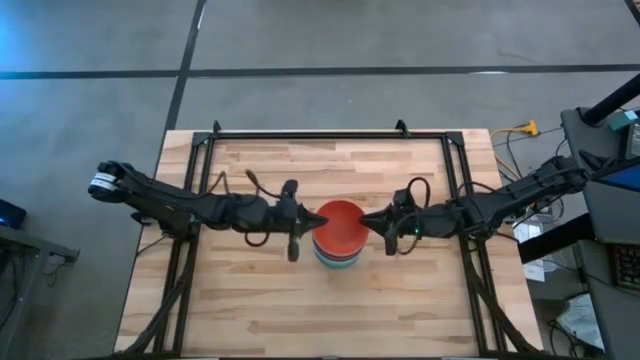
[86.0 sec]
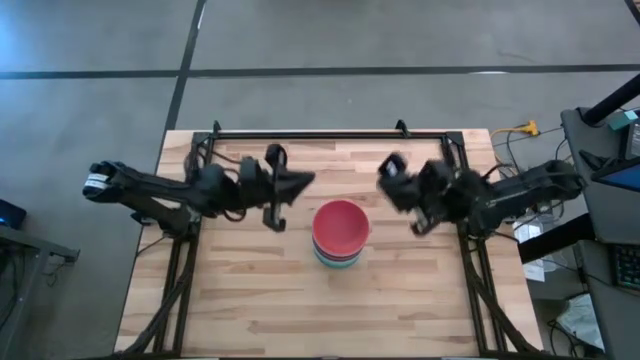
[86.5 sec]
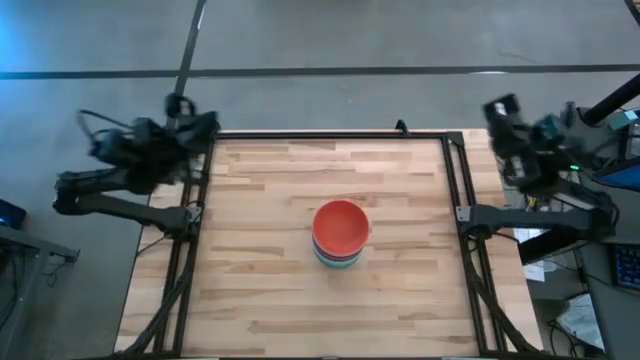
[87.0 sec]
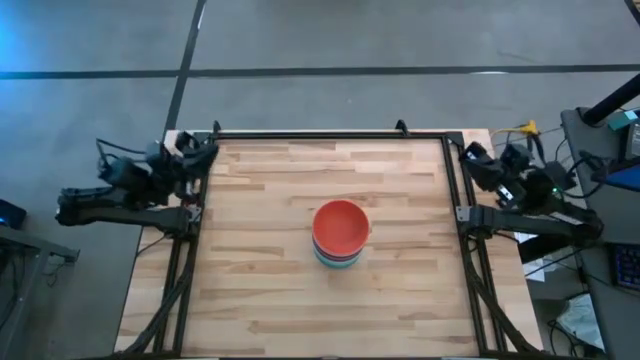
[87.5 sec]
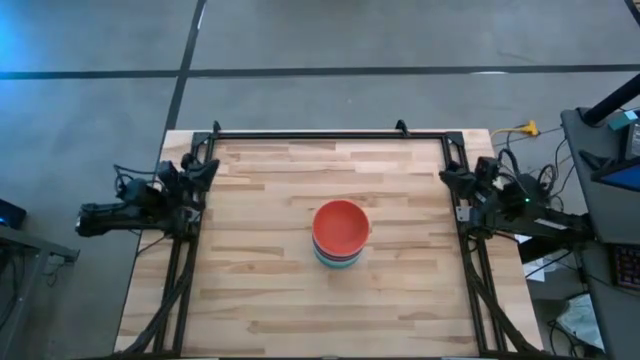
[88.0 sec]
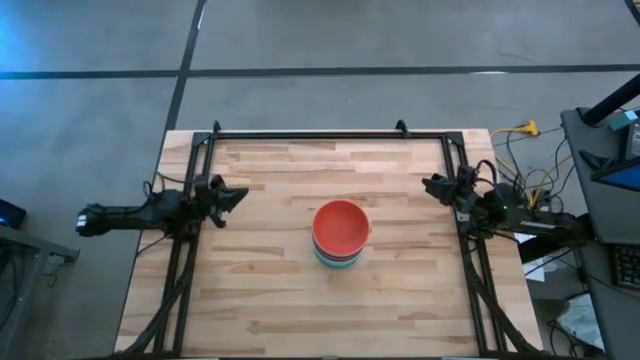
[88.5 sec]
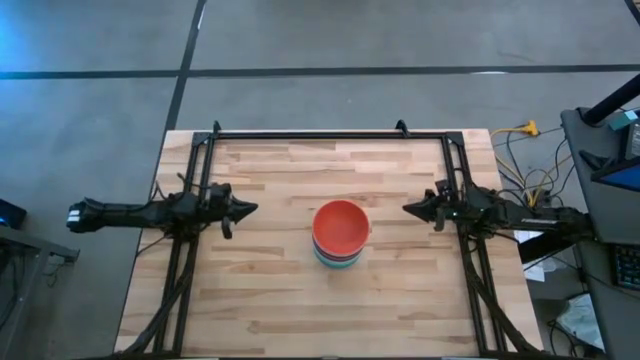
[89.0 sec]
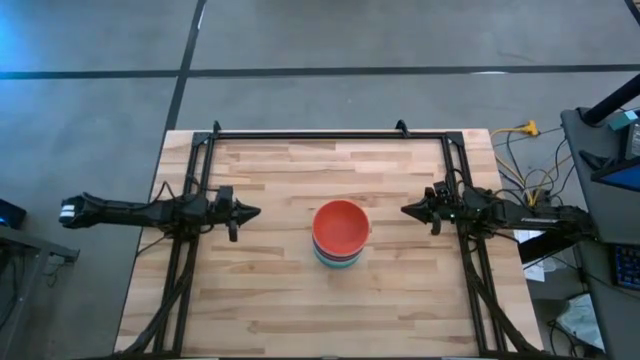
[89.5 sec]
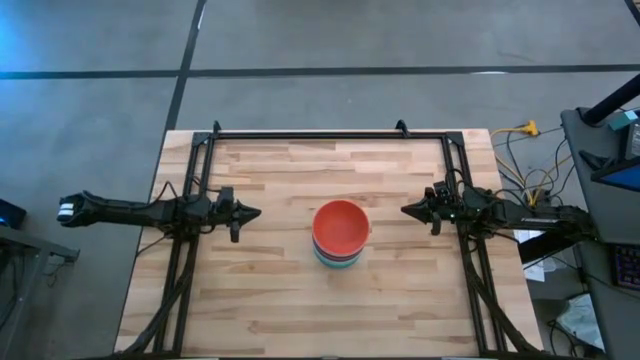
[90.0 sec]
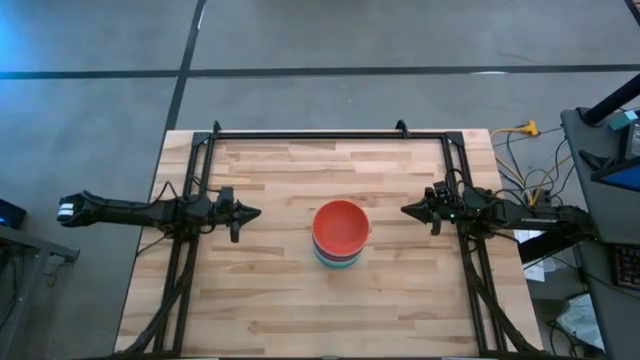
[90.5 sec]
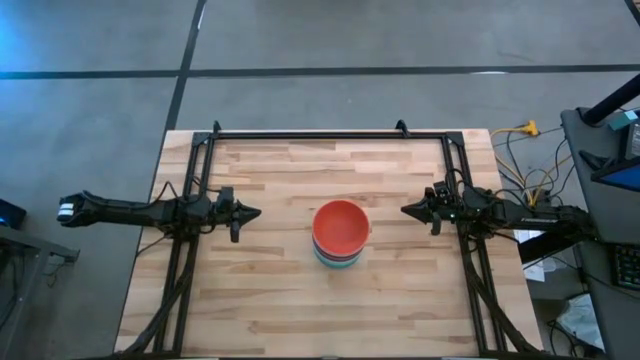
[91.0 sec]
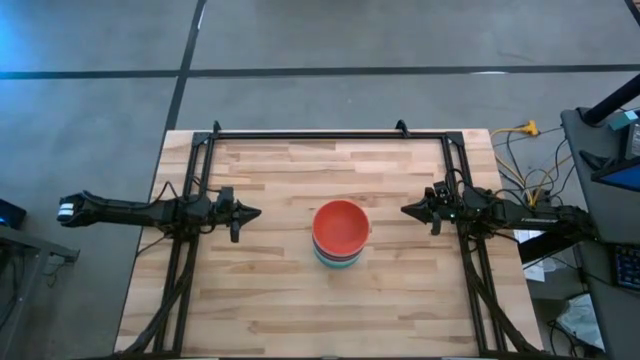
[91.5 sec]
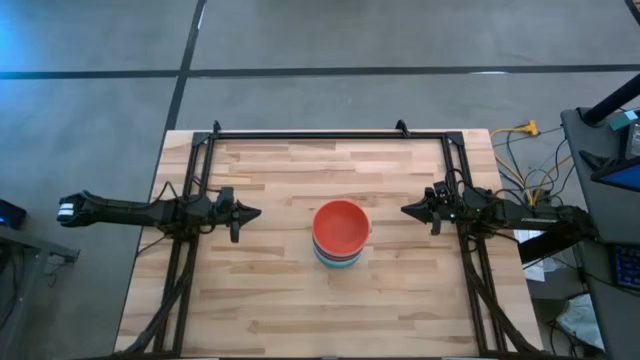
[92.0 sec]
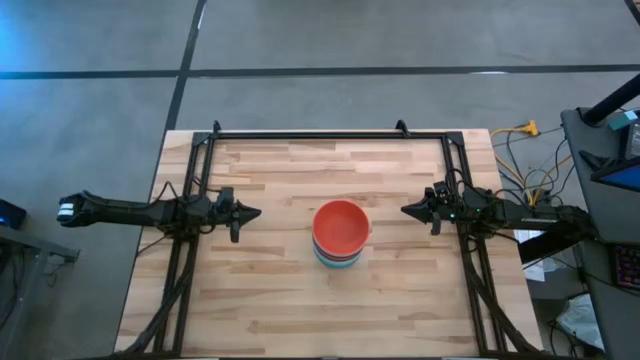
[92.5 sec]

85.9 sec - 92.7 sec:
Task: Nest bowls inside each other
Return to Home Position

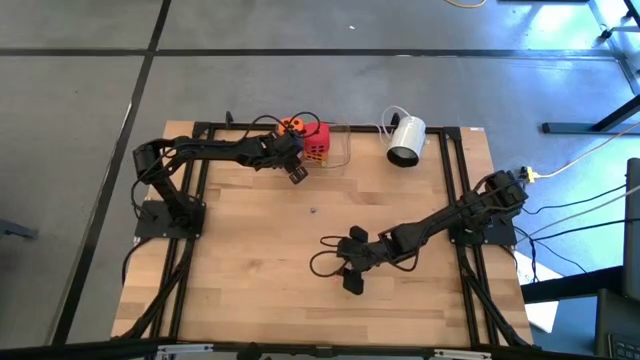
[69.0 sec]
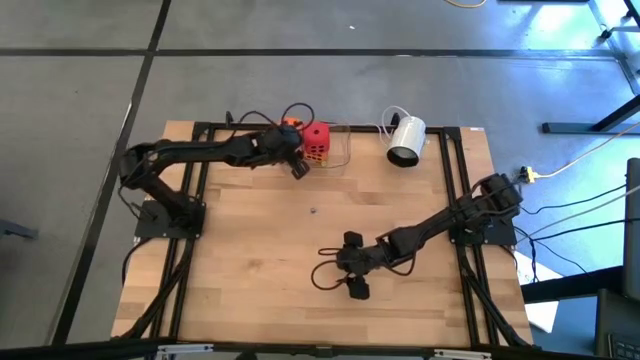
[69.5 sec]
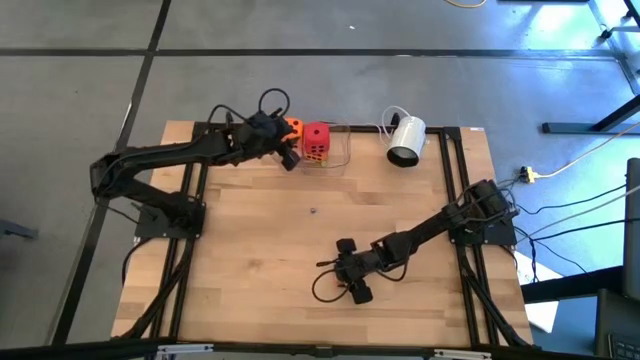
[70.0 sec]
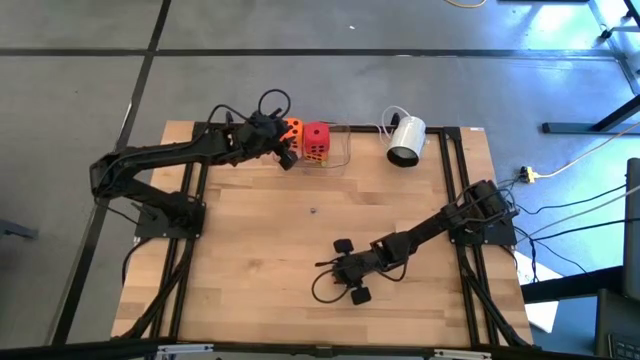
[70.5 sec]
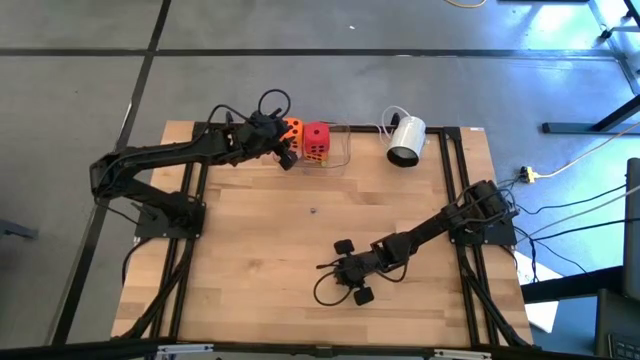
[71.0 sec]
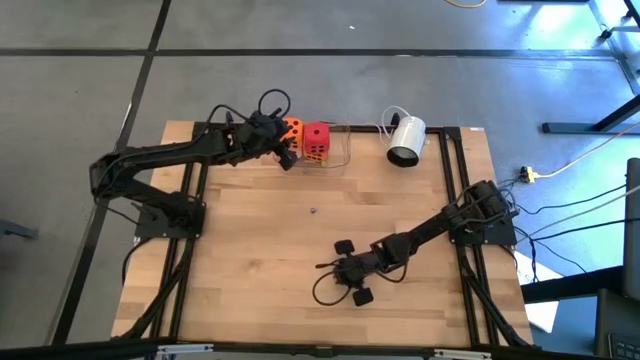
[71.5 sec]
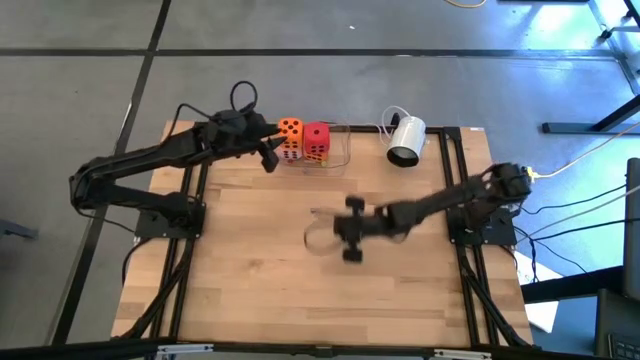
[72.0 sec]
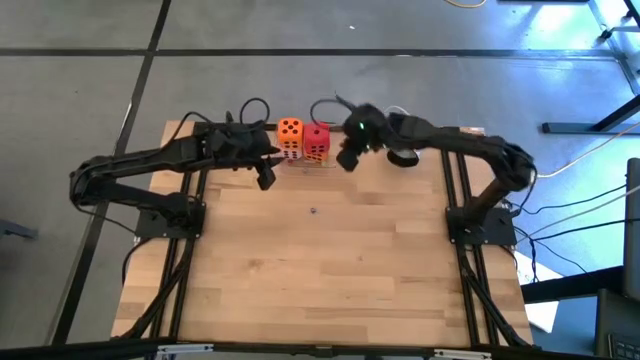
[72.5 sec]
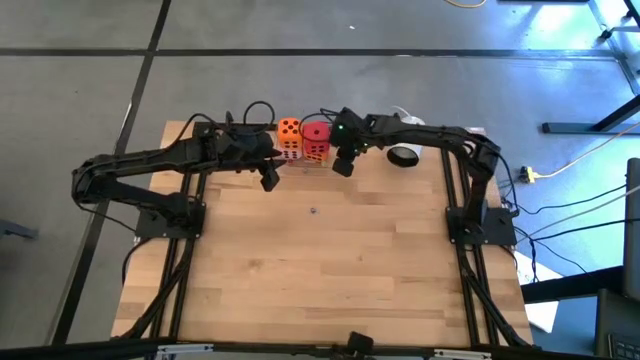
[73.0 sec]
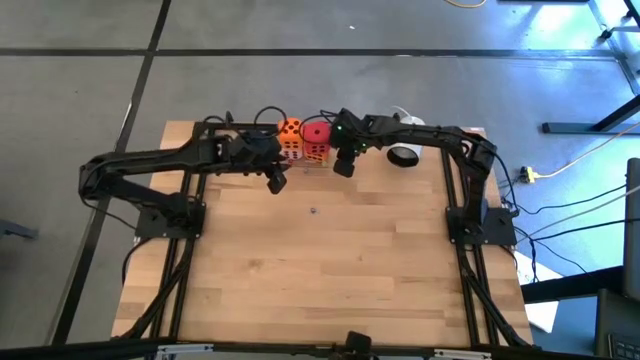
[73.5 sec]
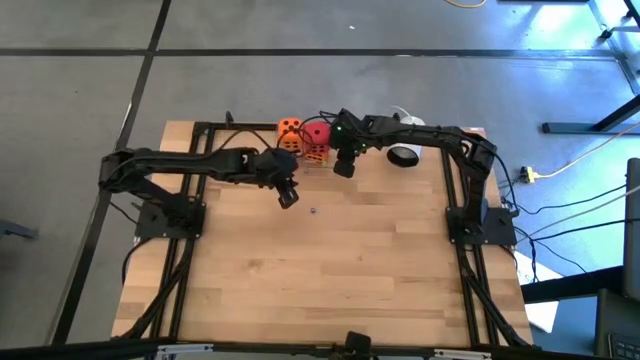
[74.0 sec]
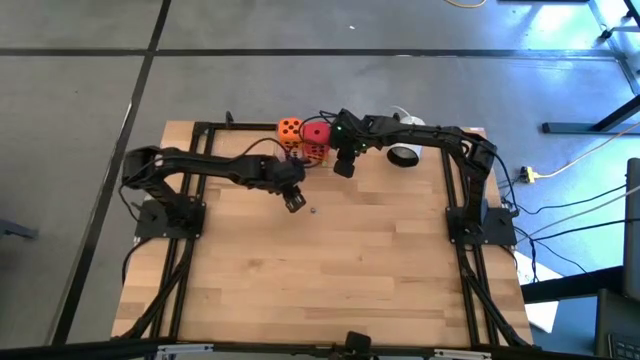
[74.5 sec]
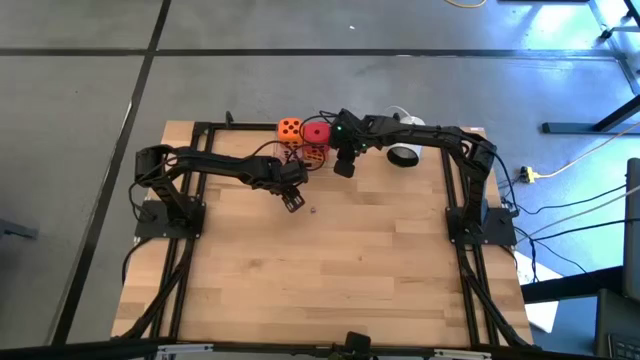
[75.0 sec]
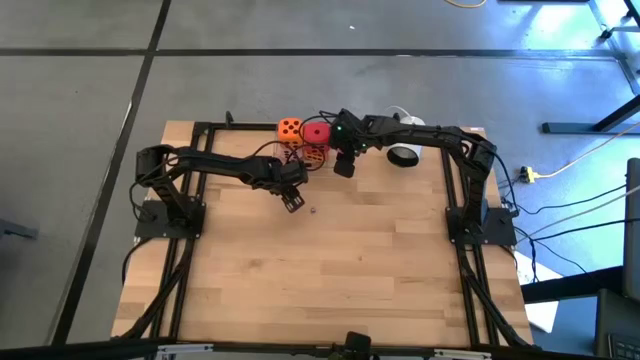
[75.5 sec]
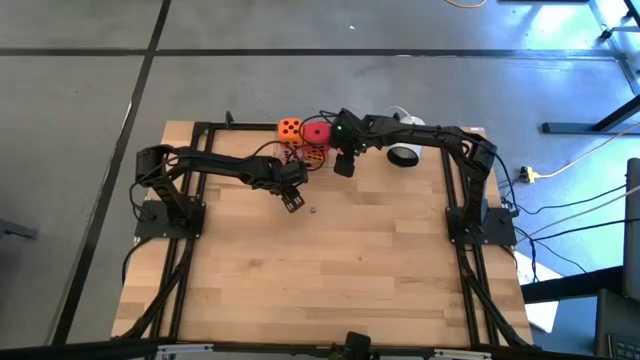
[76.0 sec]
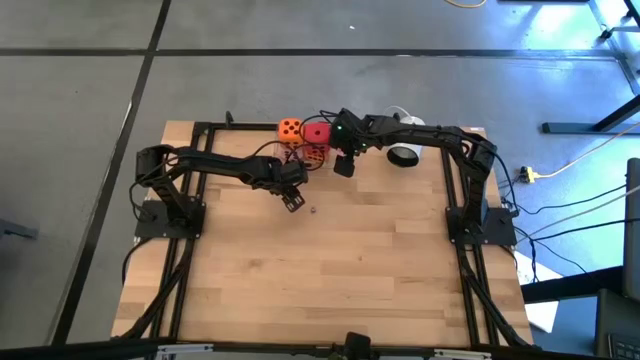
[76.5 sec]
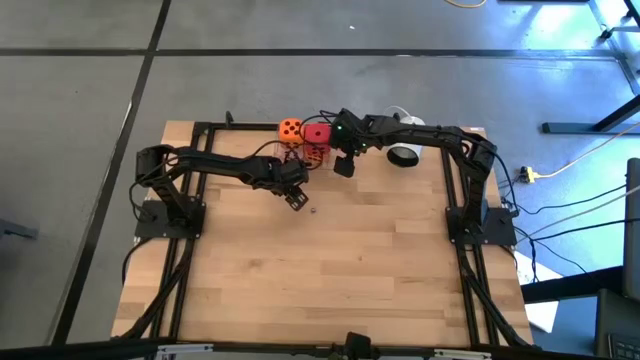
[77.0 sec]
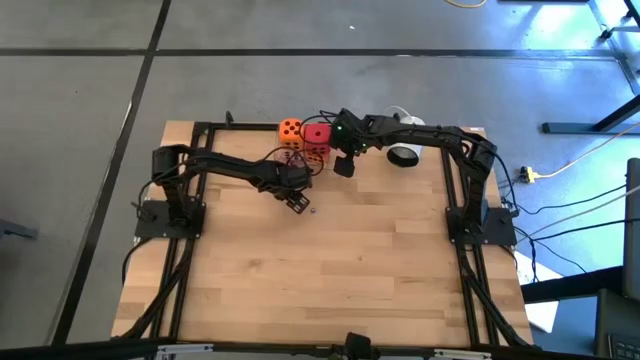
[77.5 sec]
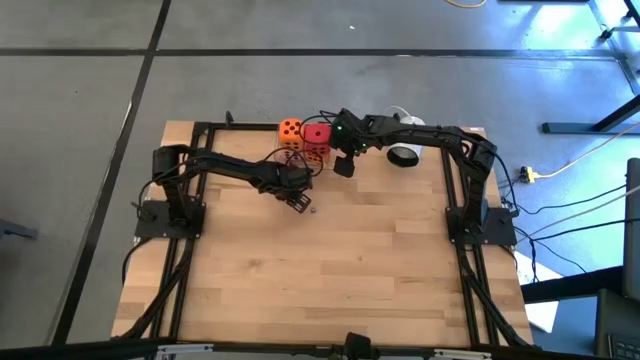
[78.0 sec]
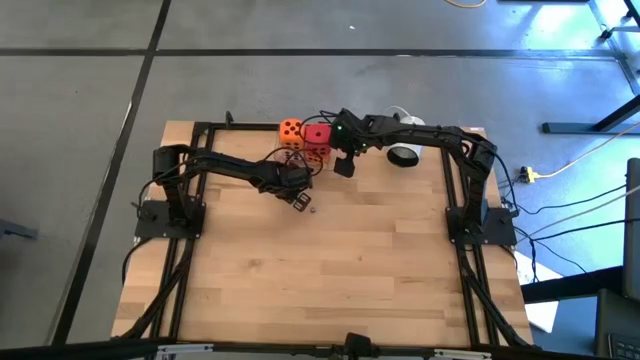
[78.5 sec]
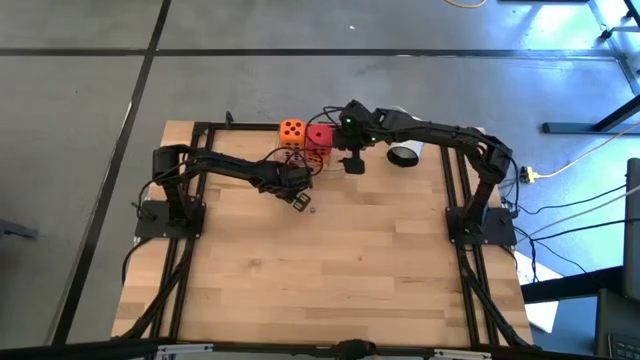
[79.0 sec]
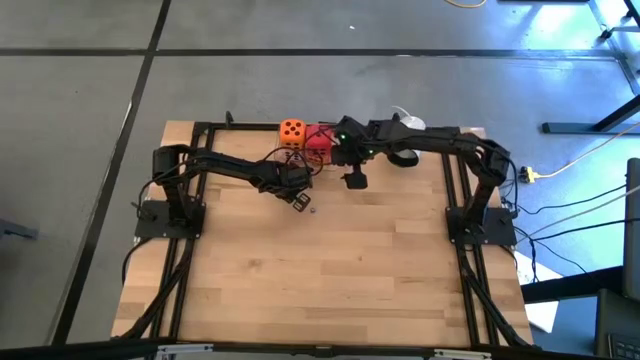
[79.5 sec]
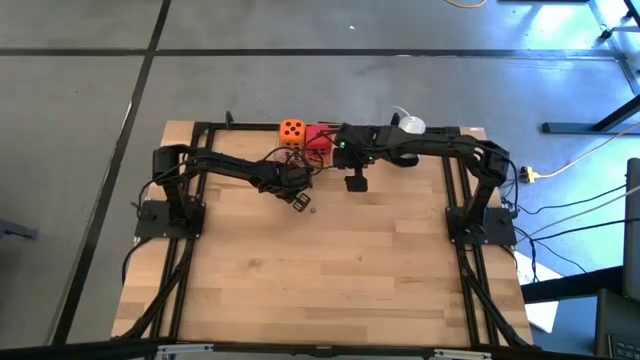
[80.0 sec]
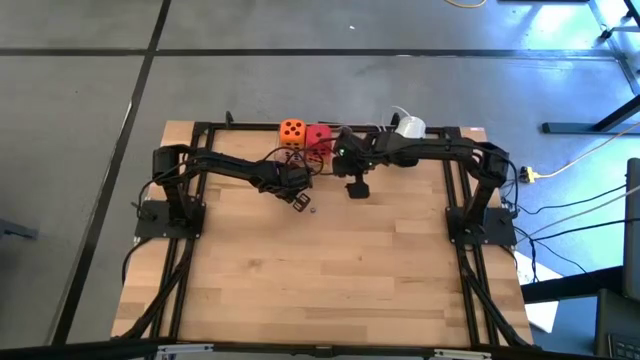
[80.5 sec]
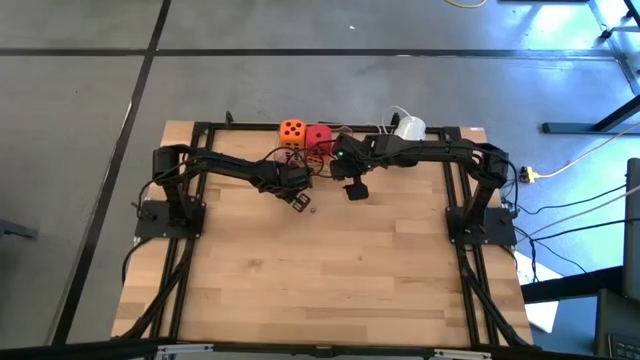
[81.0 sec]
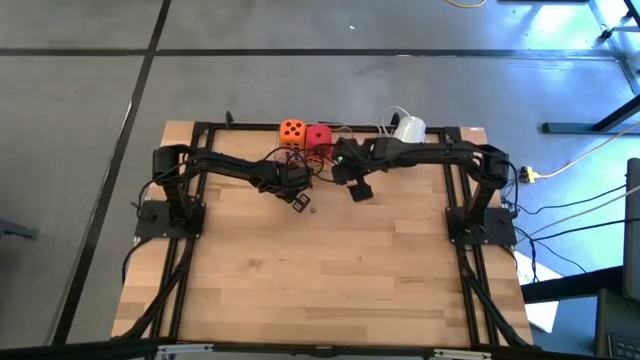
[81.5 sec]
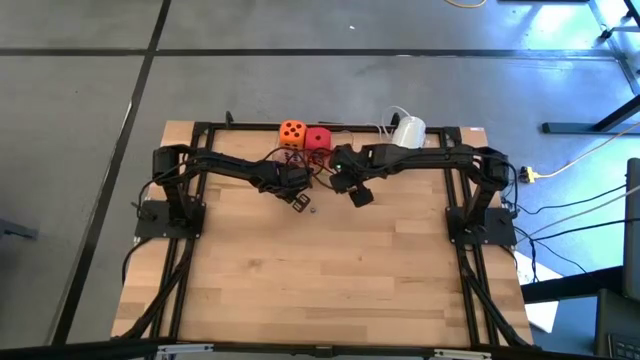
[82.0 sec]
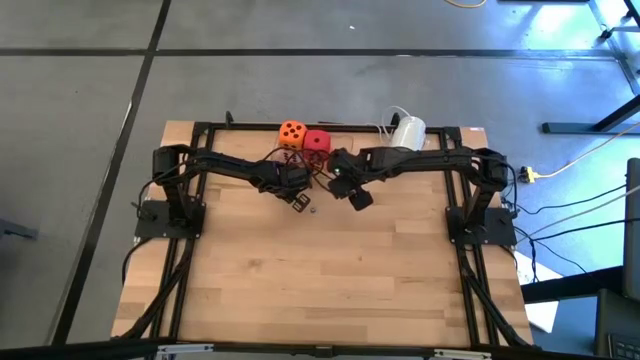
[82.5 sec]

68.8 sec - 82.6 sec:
Task: Pick & Place Dice
Put the small orange dice in the transparent bin

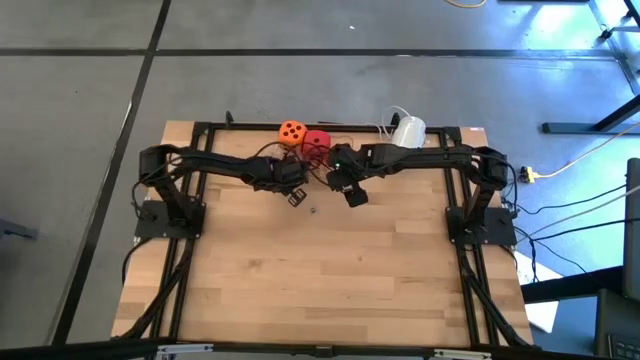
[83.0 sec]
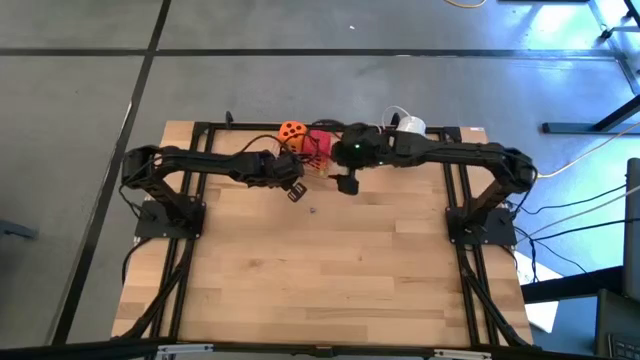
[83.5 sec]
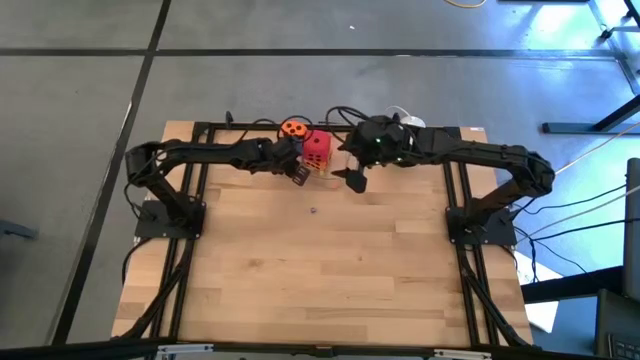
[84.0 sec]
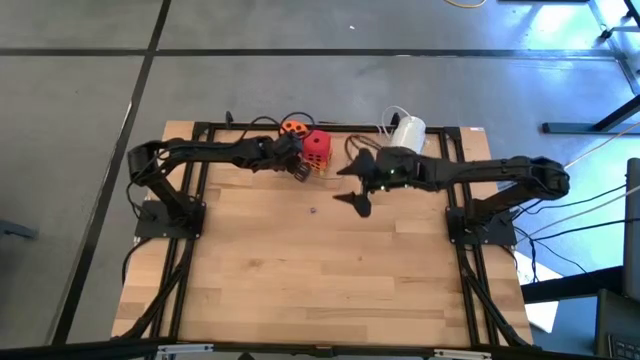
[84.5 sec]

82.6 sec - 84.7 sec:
Put the small yellow dice in the transparent bin
